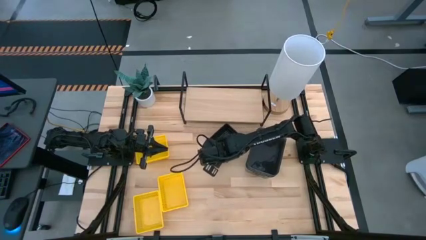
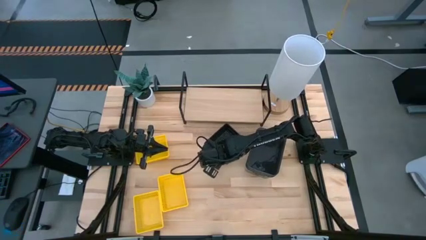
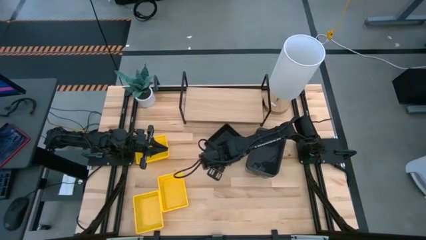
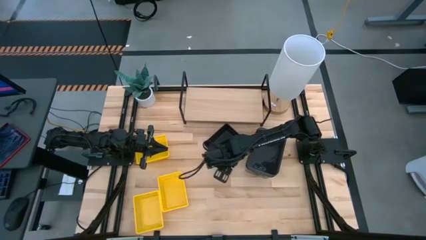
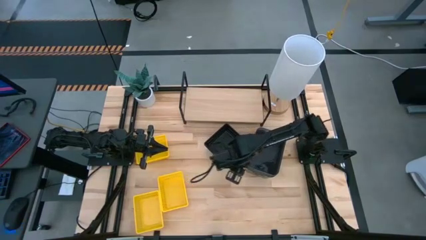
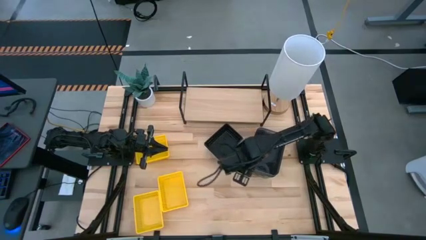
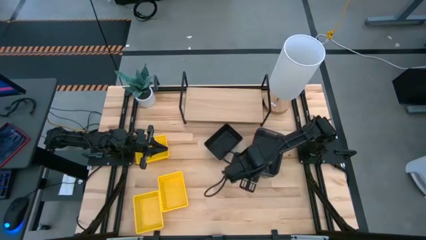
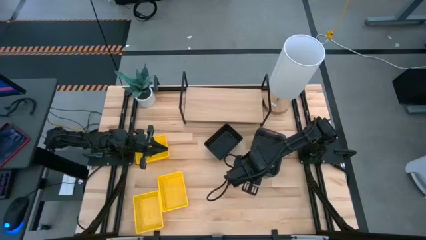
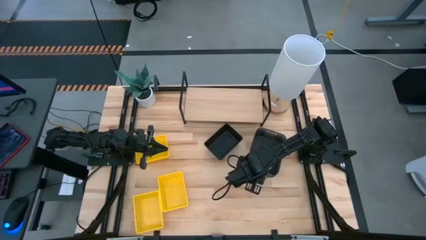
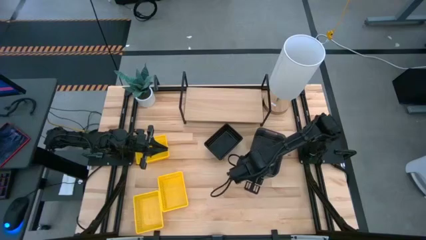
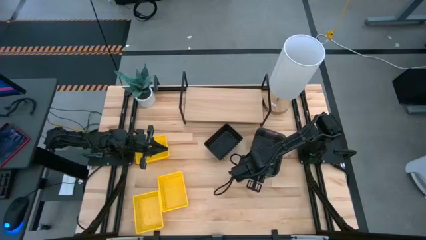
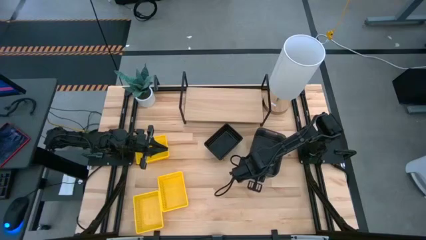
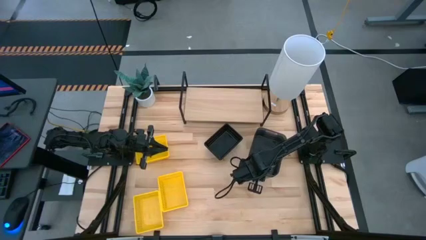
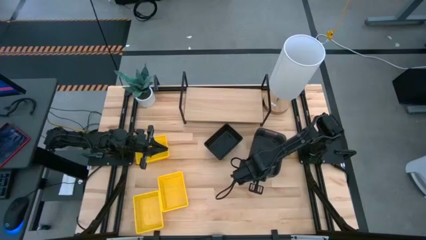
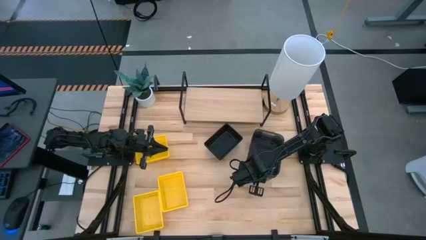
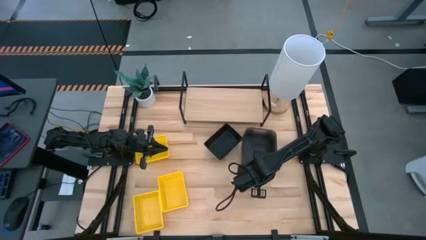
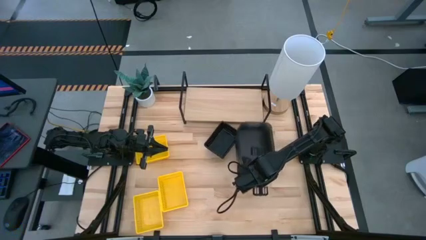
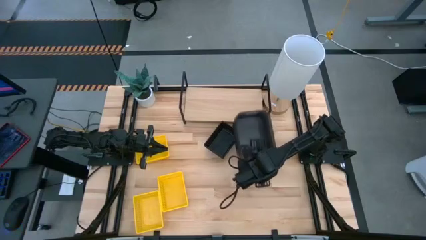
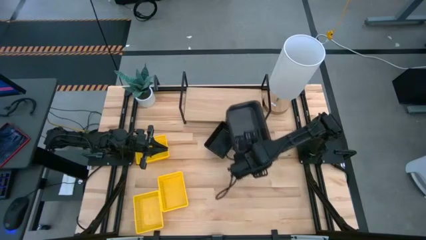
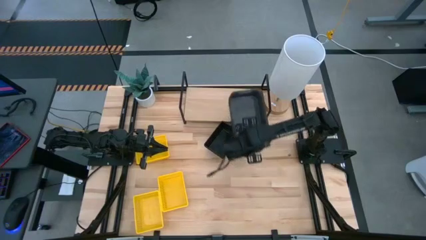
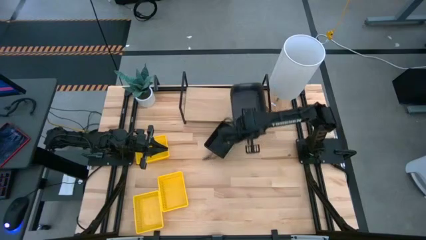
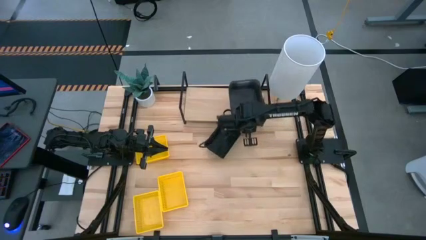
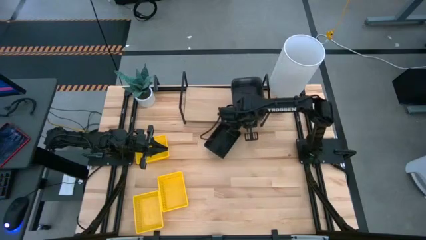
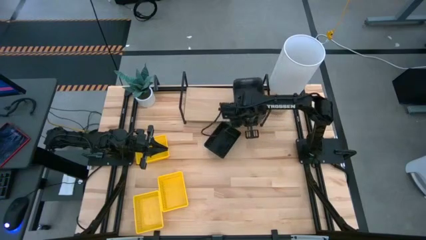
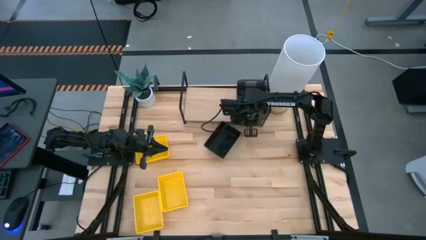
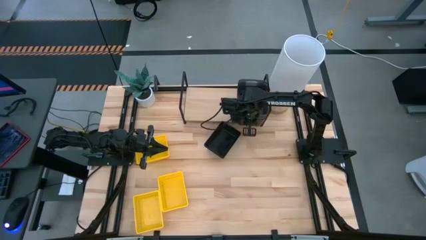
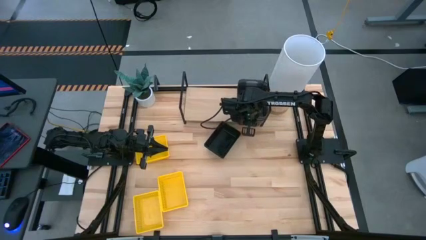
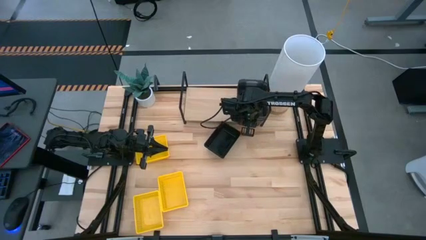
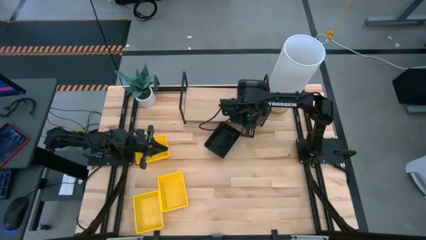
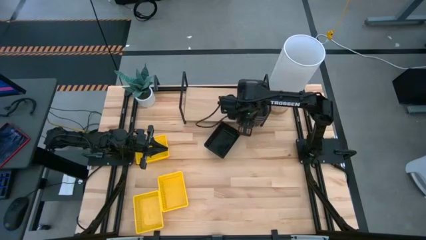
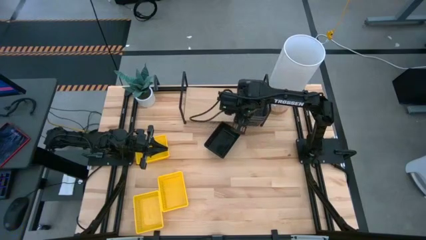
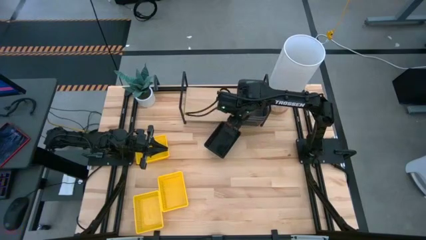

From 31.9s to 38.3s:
Task: Stack baskets on shelf by color
Put the stacked gray bins on the shelf

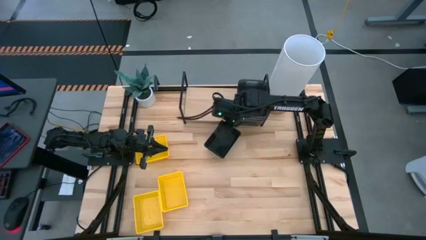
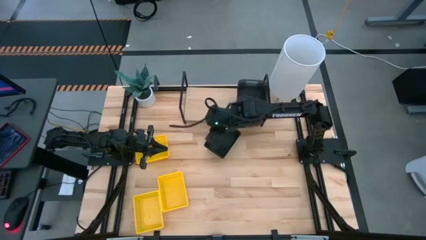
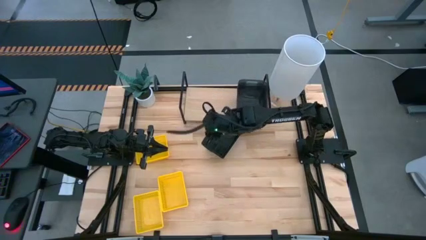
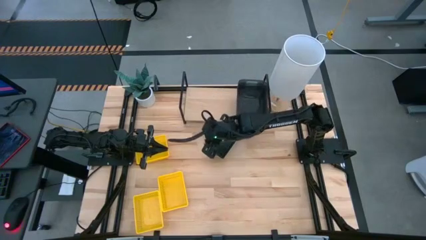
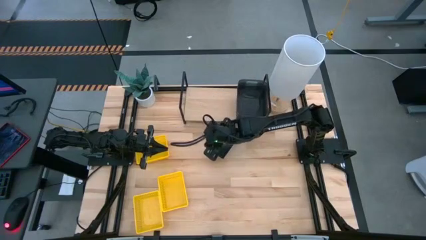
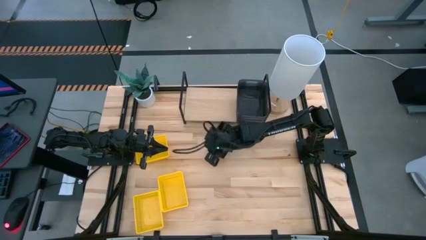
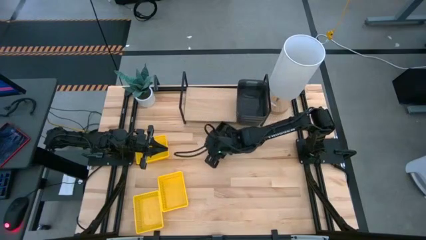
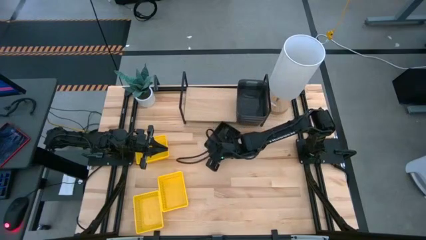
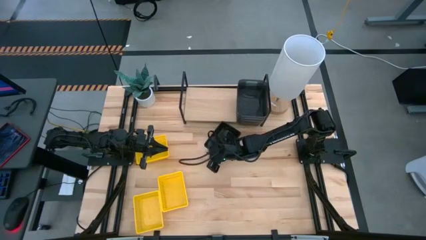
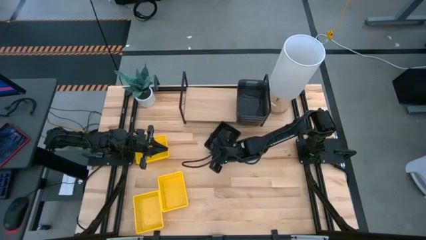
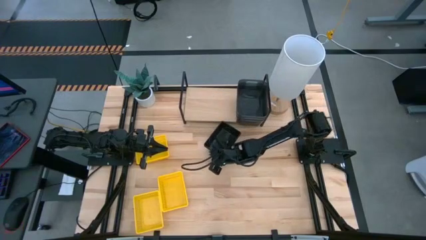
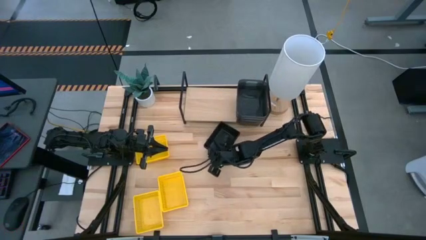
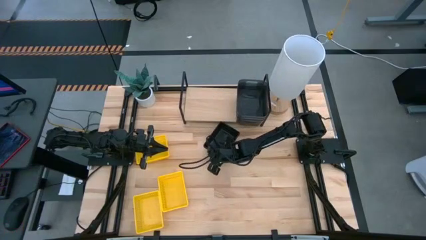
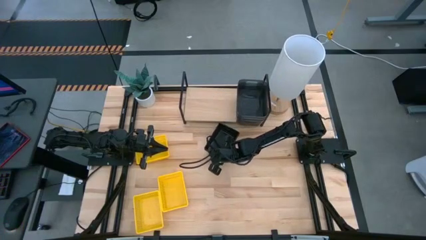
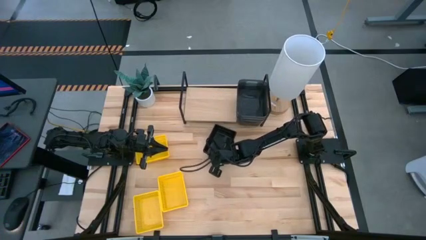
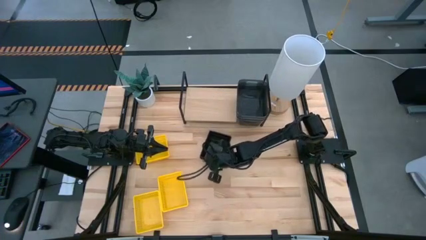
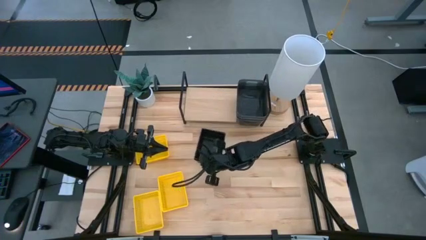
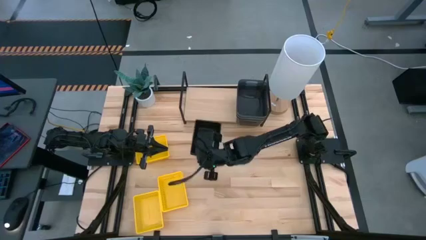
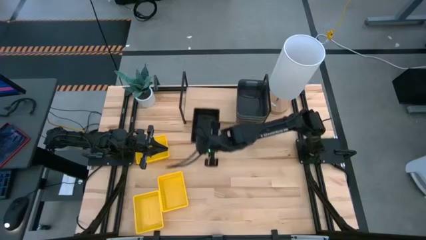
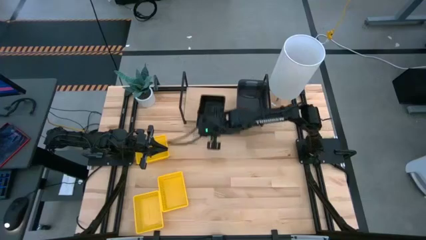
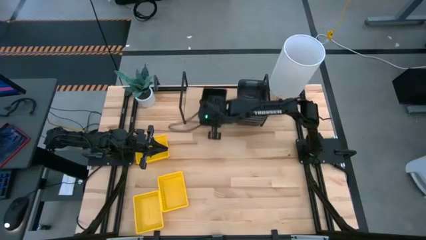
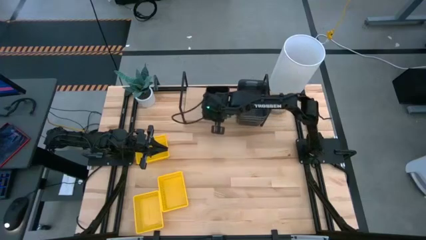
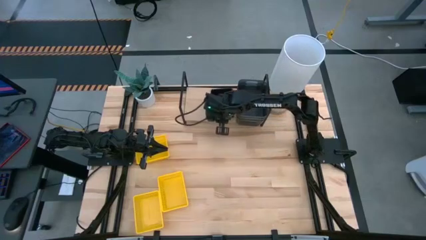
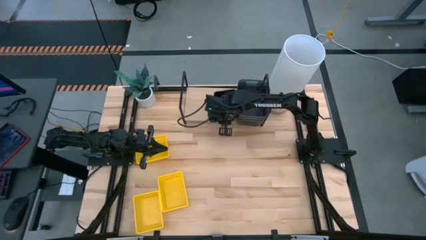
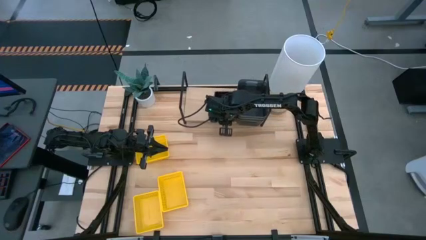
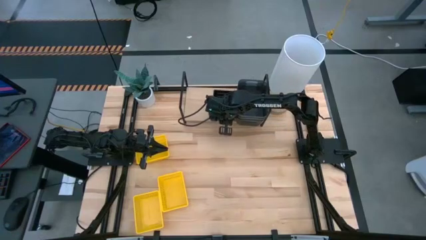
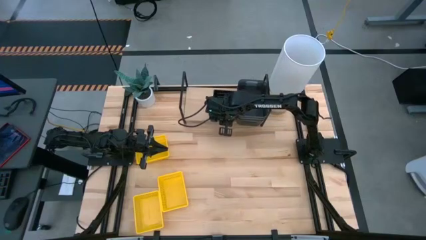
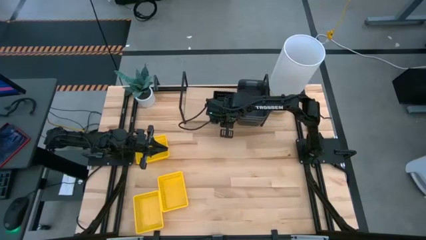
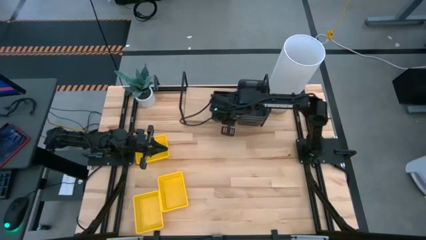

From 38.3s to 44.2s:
Put the stacked black bins on the shelf

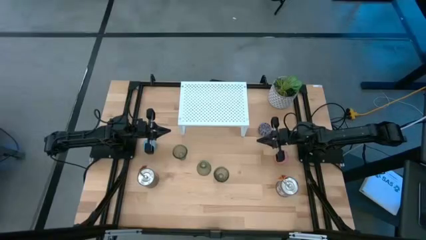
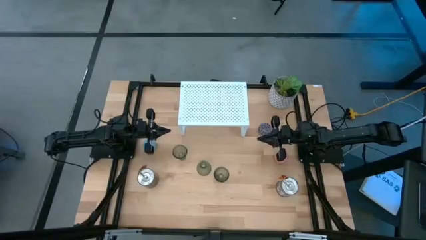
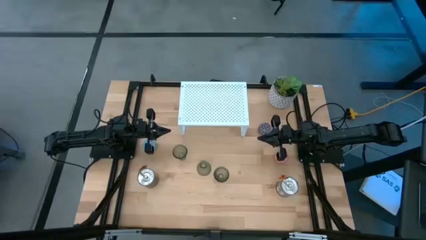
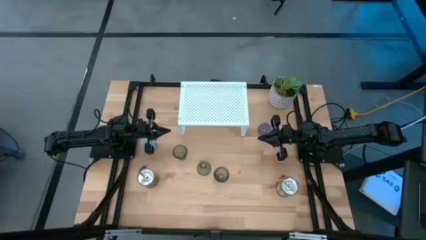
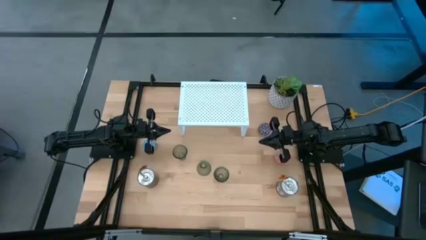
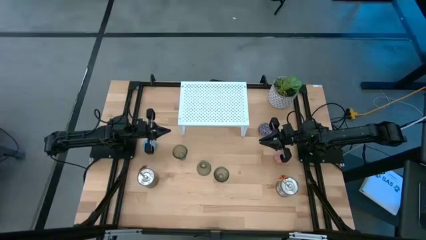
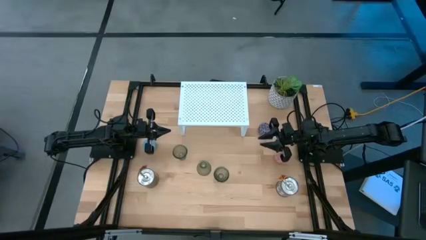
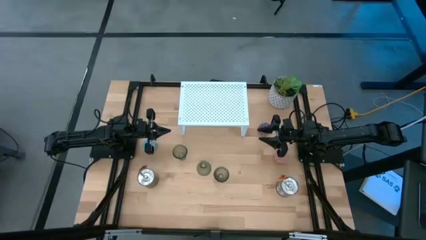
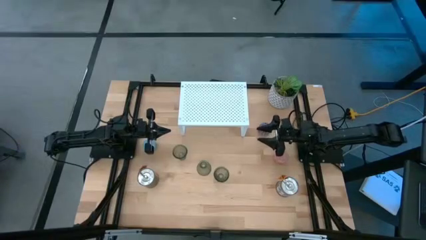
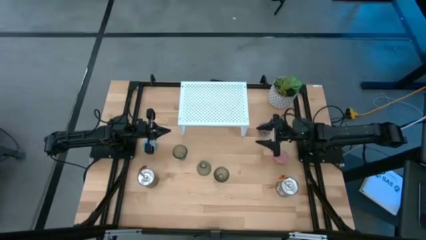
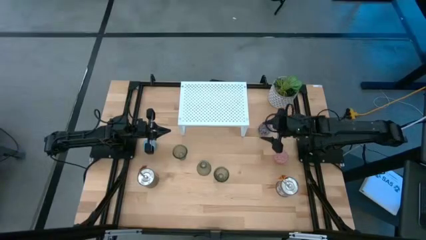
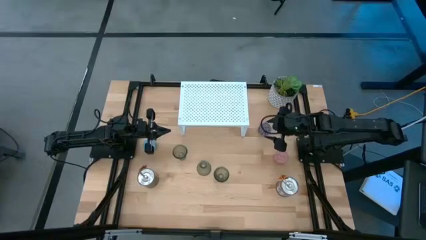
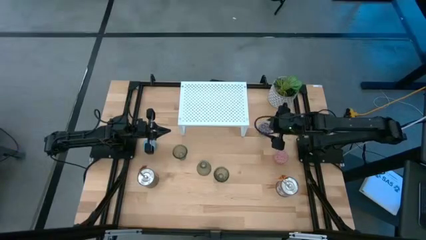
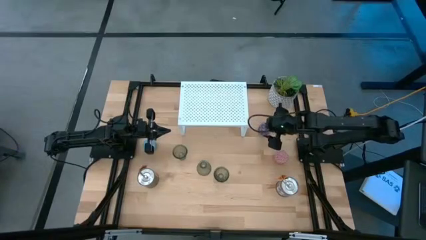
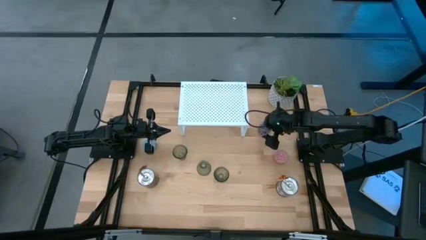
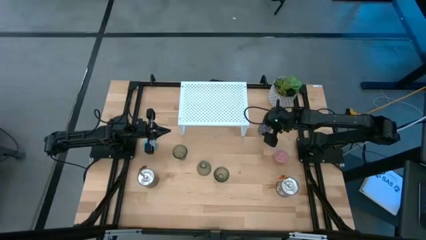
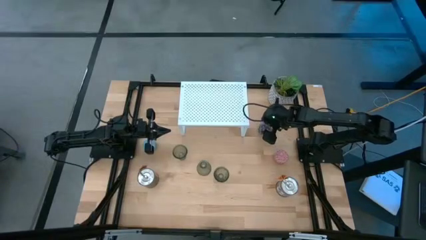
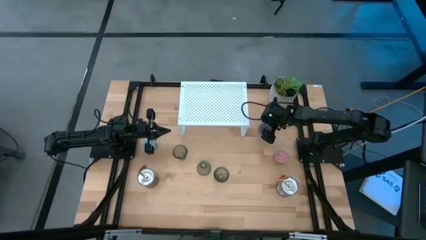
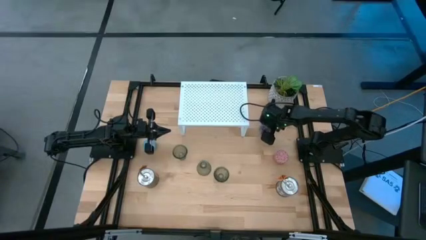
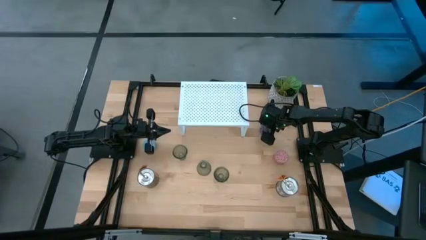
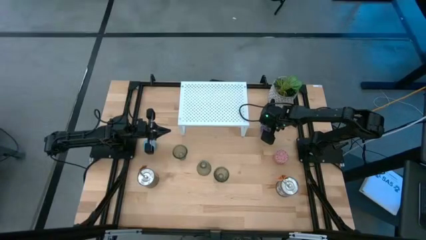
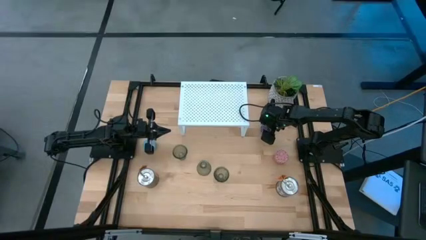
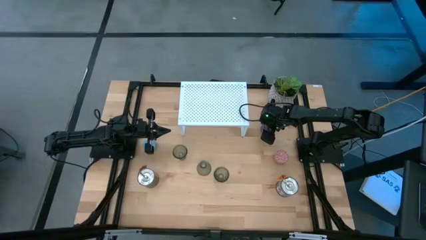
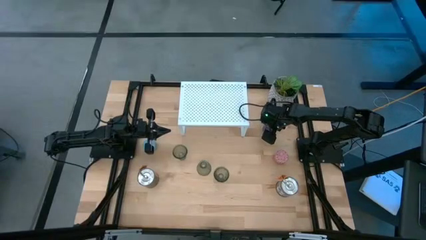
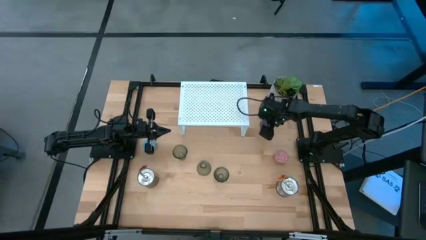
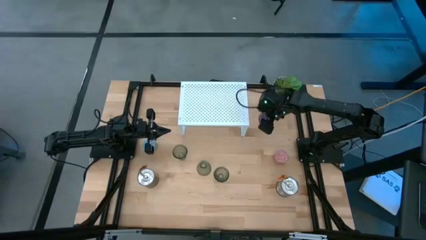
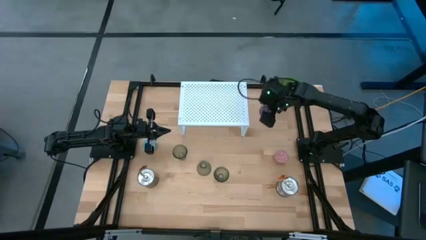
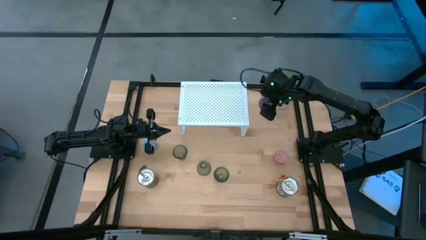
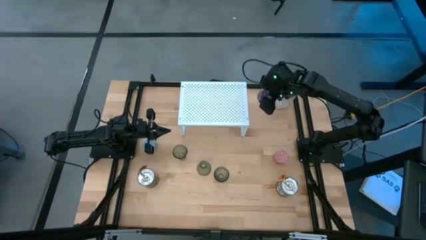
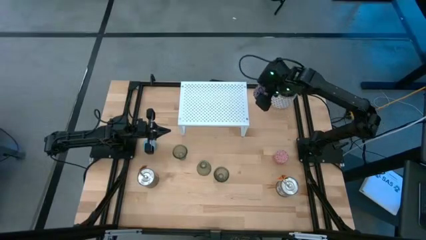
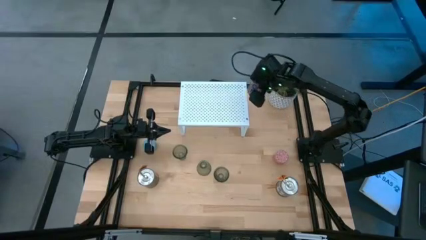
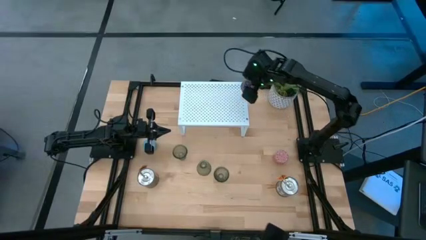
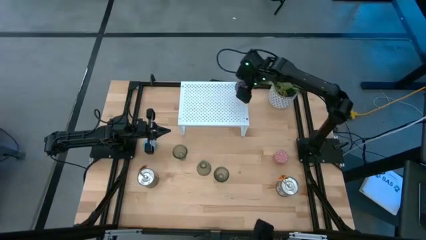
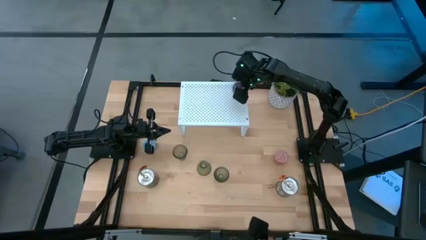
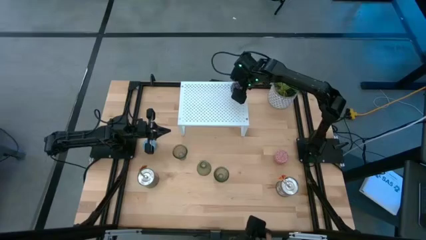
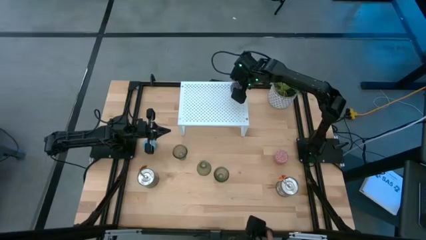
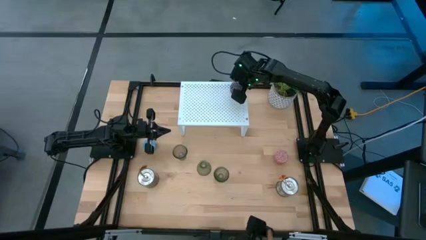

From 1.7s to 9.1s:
Task: Pick & Place candle stick holders
Put the black patterned scented candle on the shelf
